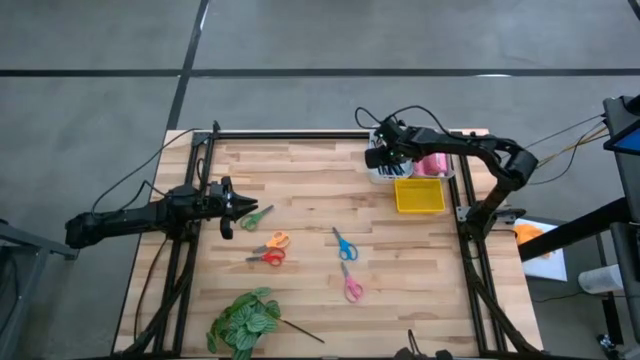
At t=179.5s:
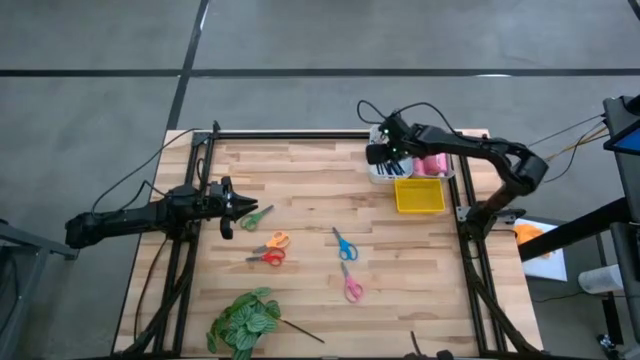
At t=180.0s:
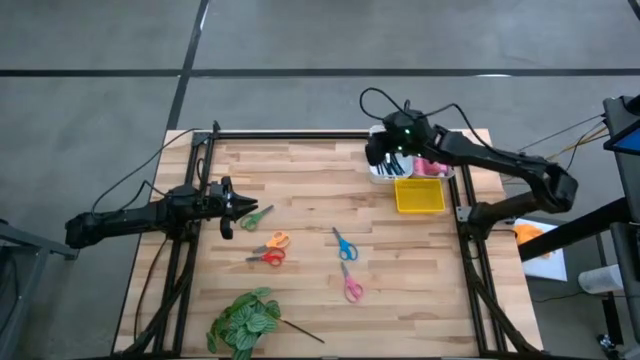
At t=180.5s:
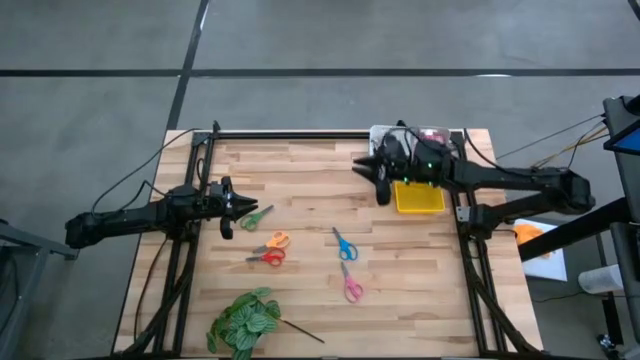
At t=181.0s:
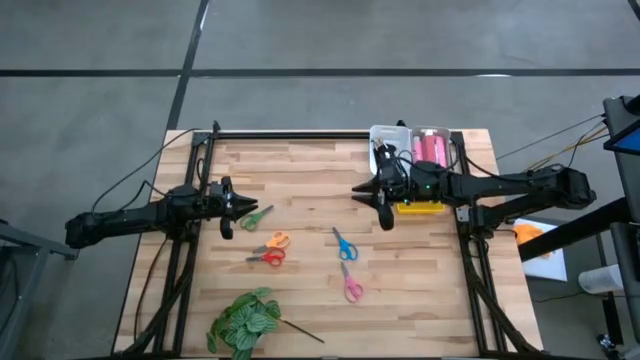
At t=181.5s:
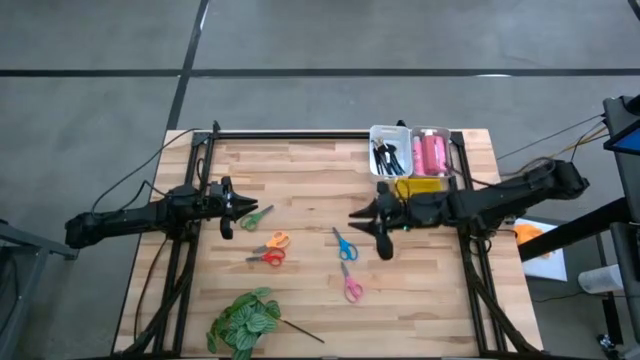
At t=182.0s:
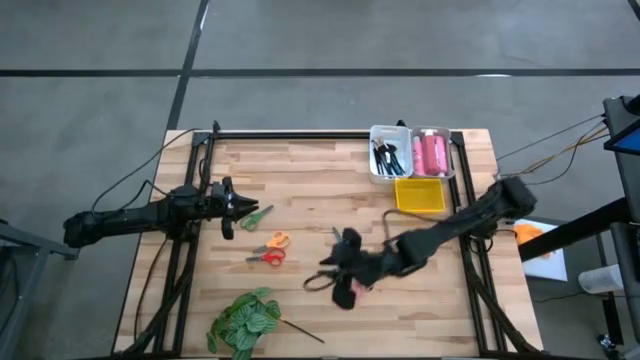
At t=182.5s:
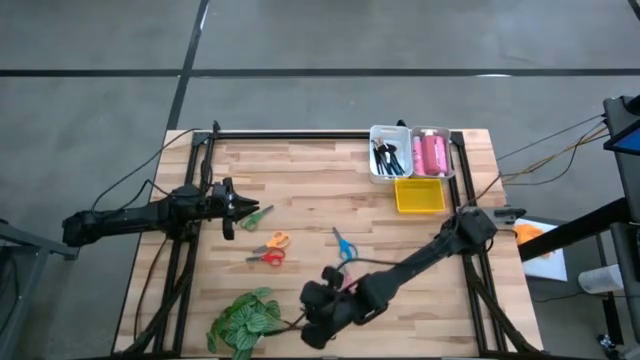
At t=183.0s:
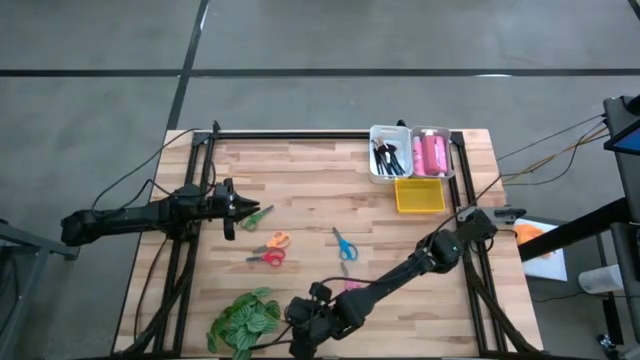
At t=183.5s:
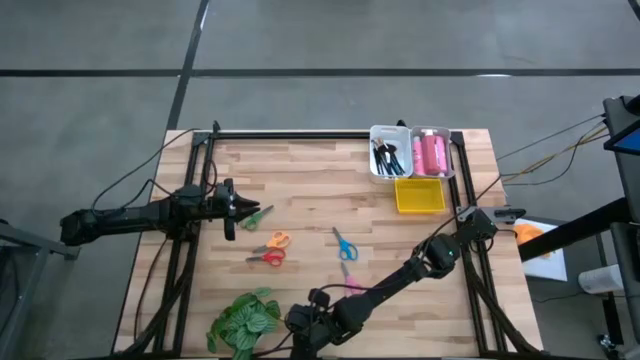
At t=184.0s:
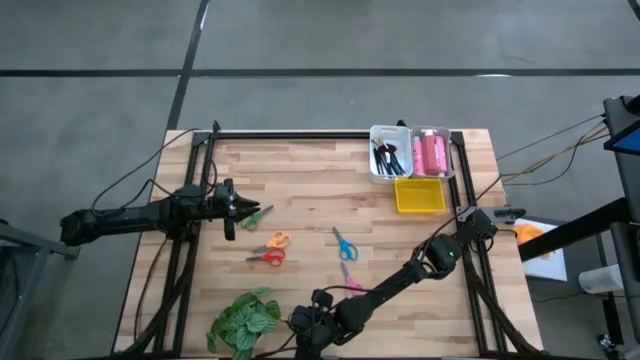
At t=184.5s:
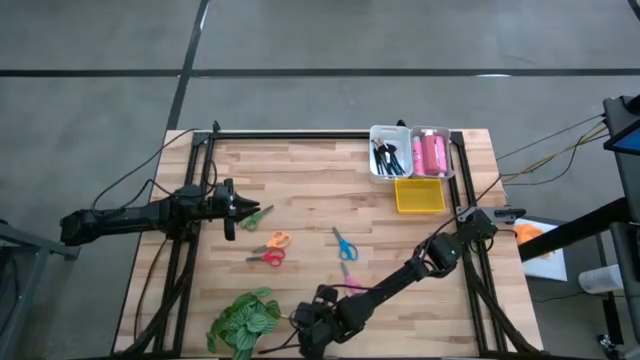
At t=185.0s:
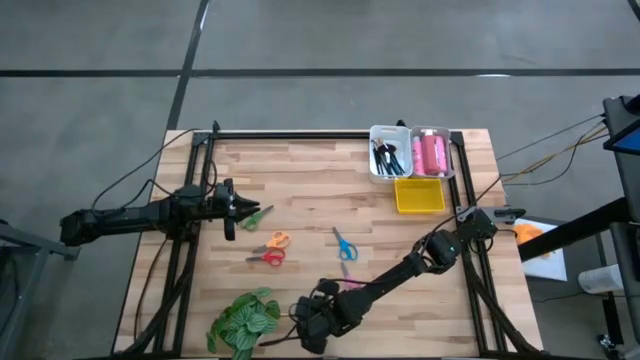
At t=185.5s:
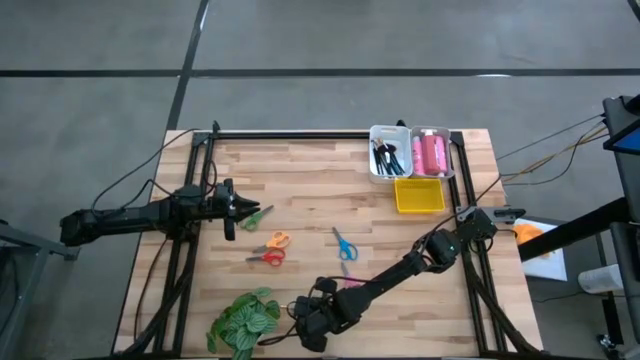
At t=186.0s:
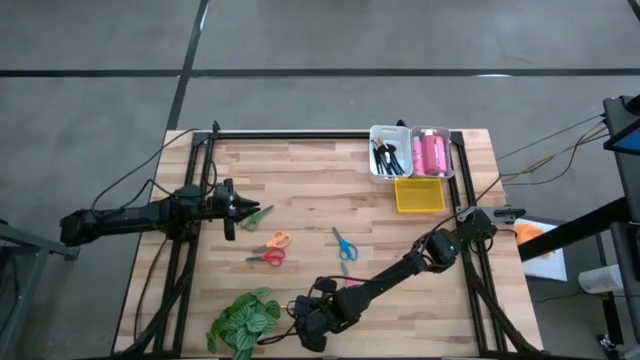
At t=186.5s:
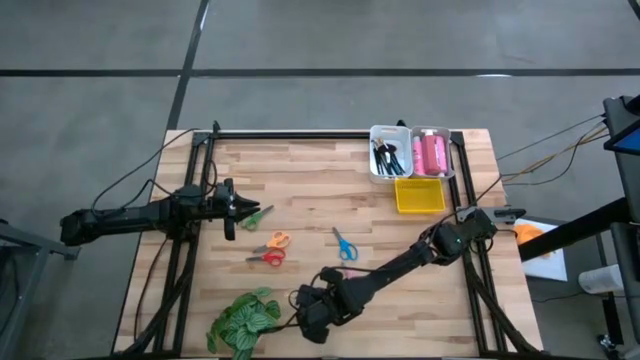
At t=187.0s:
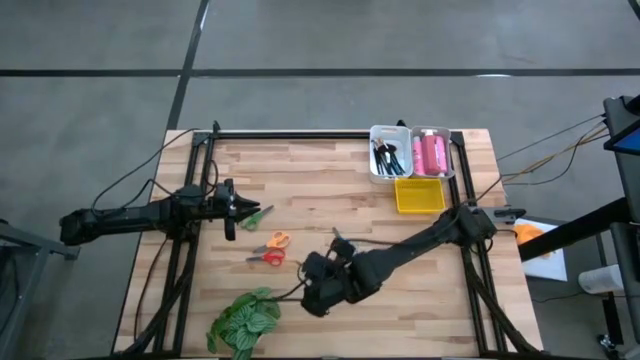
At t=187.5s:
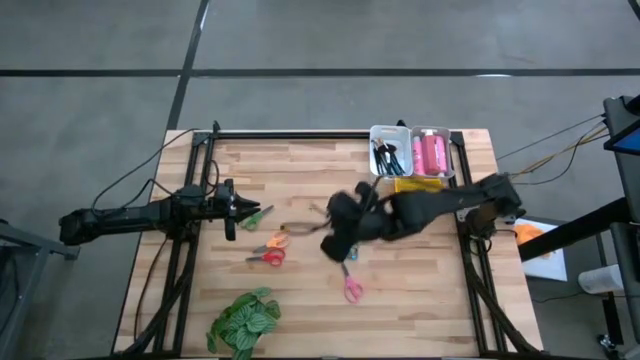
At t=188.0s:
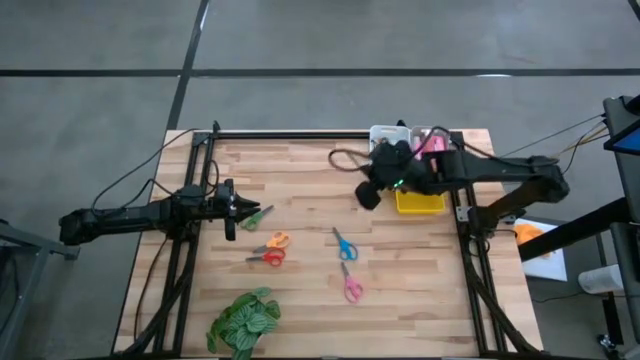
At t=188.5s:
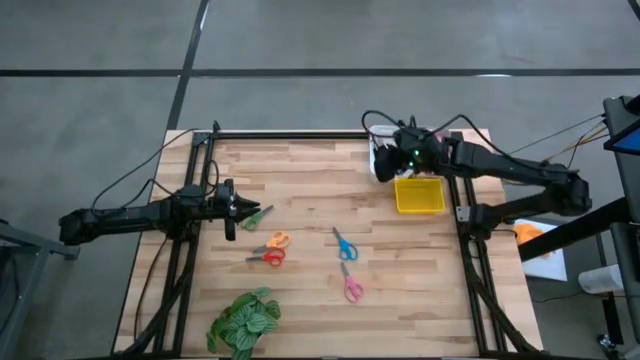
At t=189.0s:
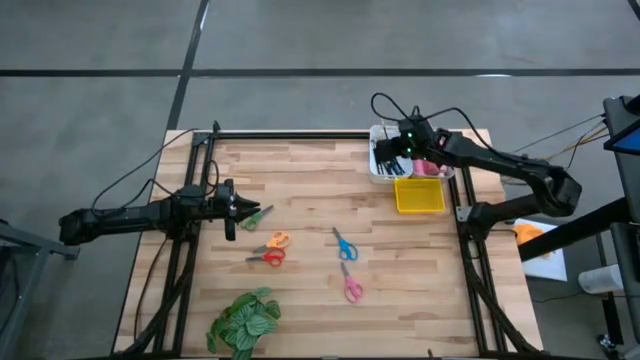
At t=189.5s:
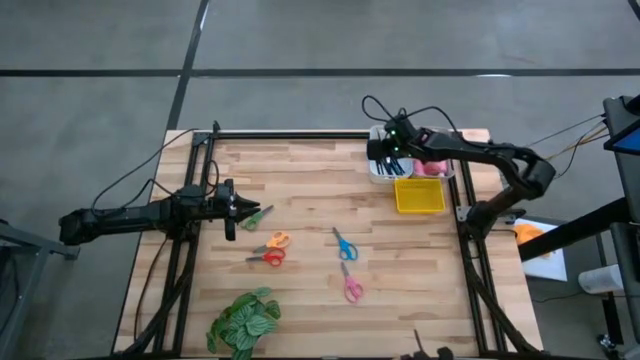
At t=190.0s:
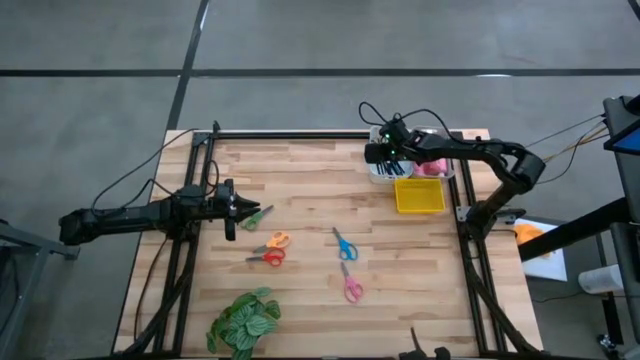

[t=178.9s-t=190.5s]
Task: Pick & Place Paint Supplies
Put the black paint brush into the white bin

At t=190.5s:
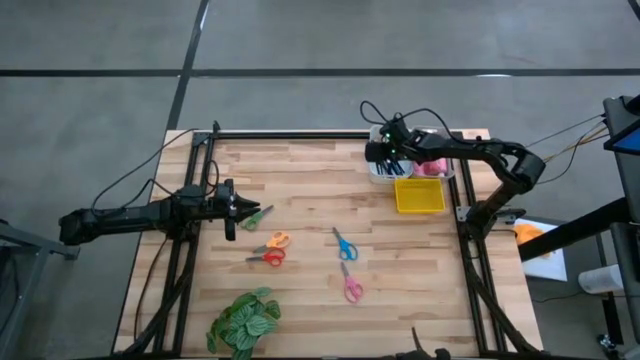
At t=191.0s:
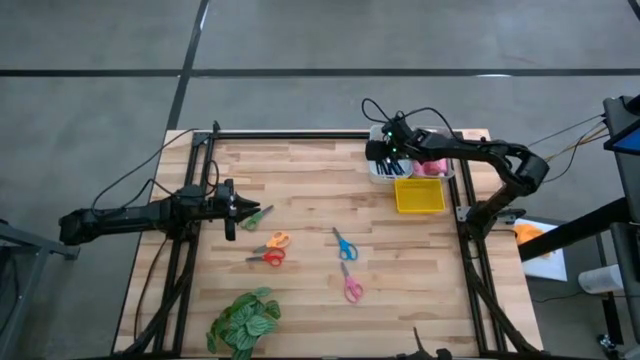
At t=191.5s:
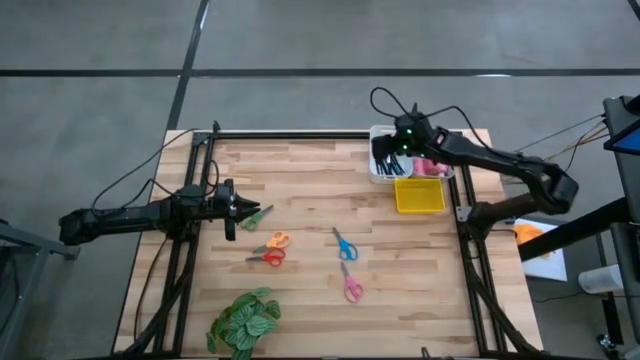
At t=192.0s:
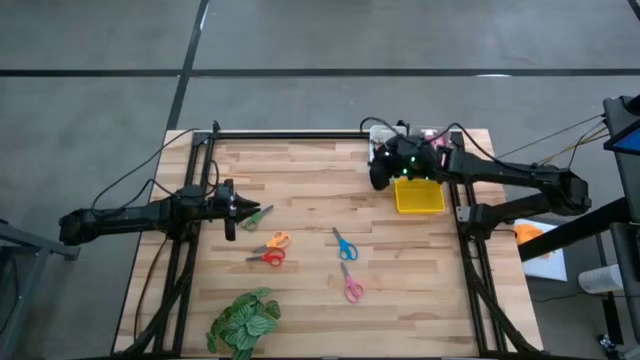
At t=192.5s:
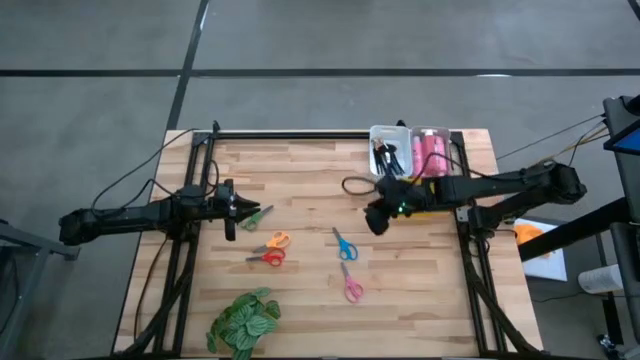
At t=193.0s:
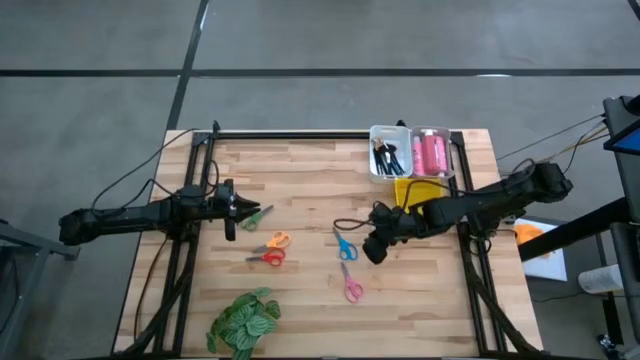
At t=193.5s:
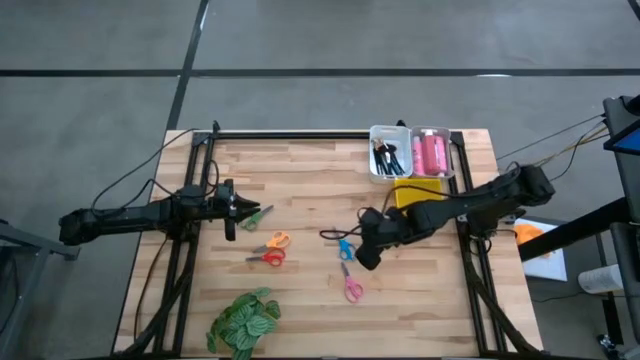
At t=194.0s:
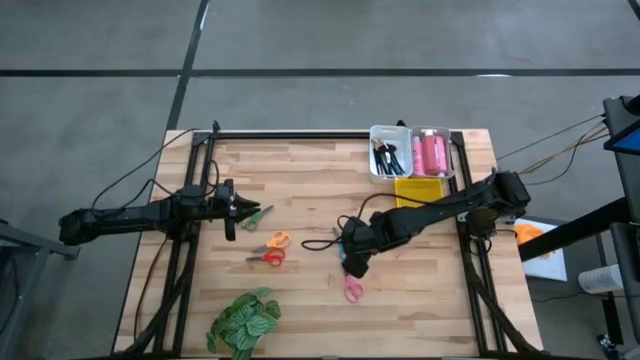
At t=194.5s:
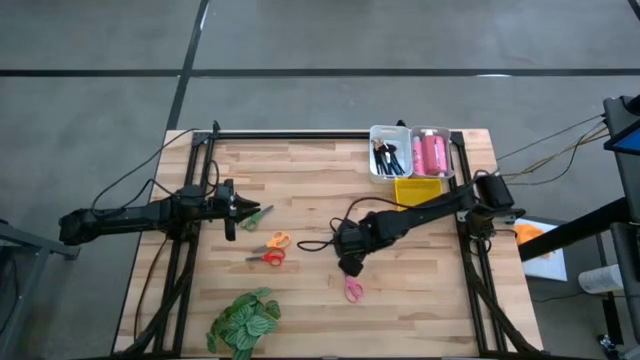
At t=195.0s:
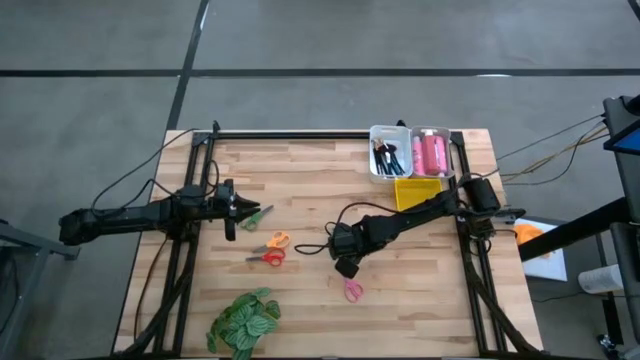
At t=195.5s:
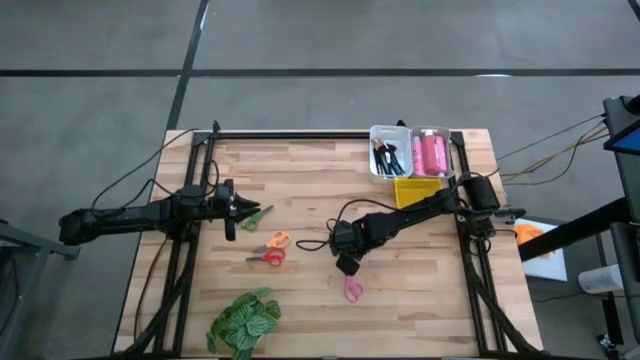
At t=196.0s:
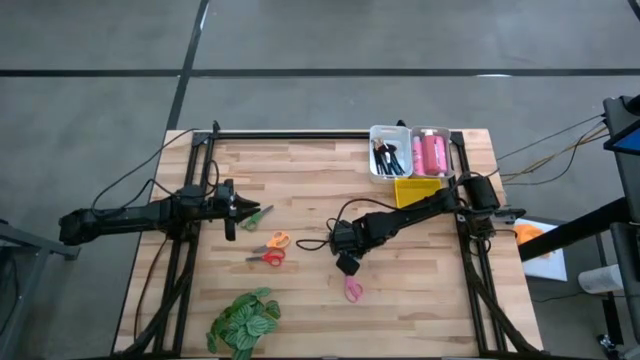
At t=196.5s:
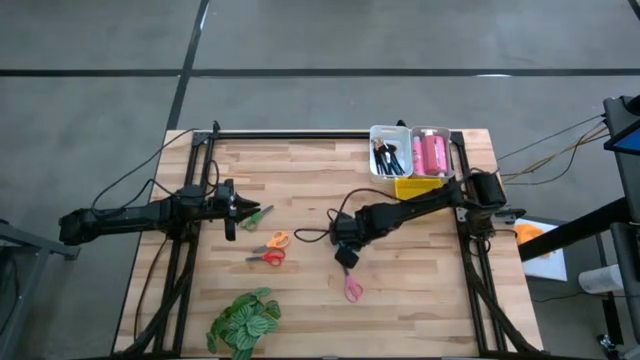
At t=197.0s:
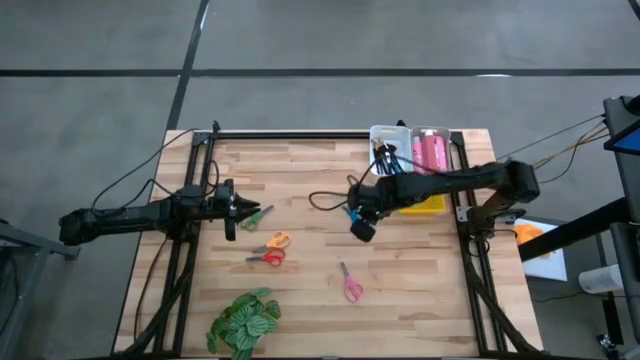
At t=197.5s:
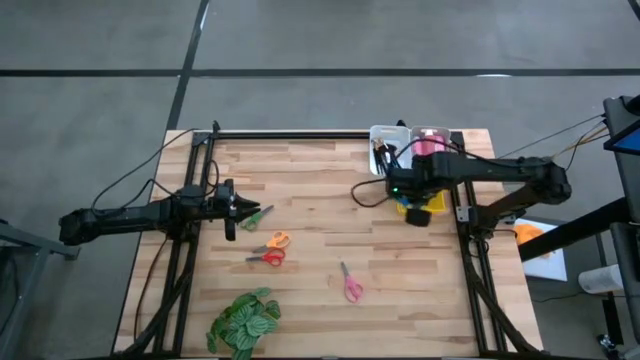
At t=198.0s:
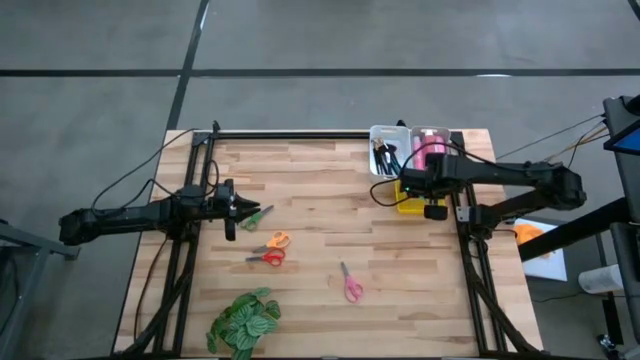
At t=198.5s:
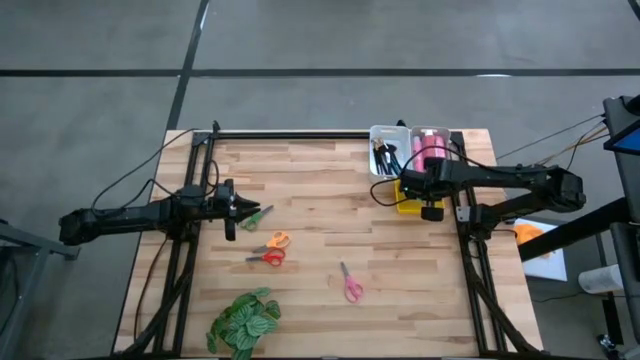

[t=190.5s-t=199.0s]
Put the blue scissors into the yellow bin
